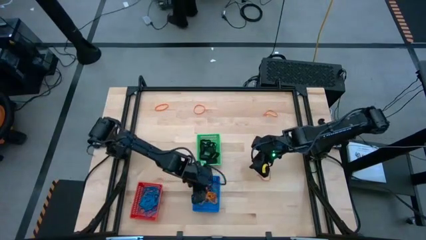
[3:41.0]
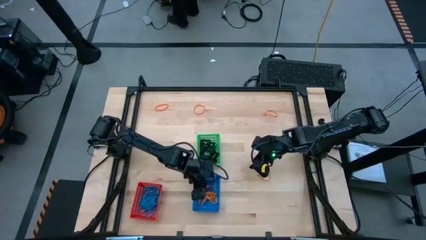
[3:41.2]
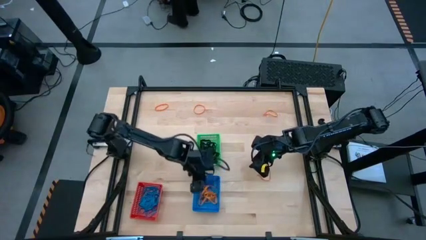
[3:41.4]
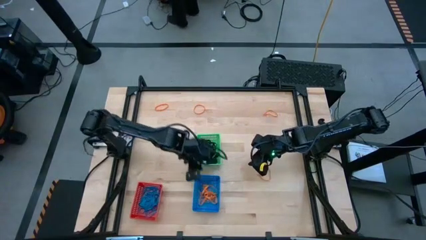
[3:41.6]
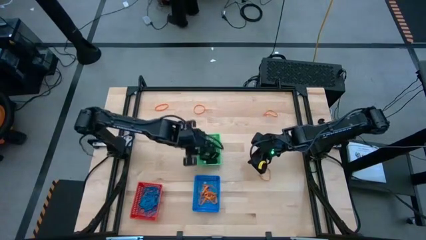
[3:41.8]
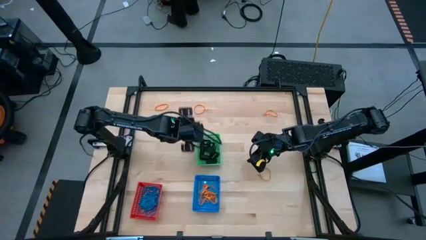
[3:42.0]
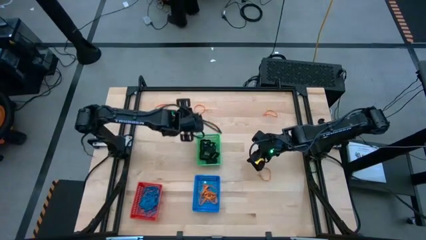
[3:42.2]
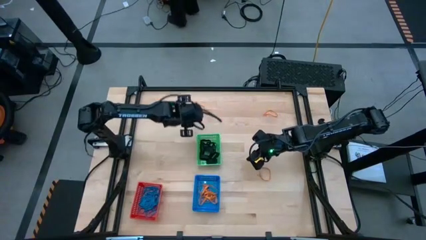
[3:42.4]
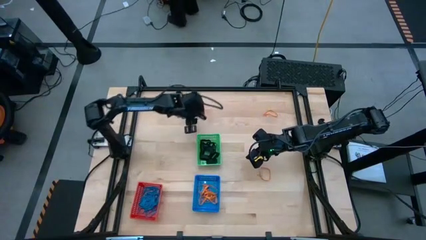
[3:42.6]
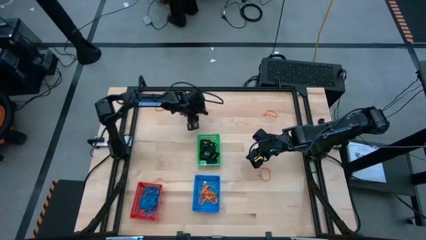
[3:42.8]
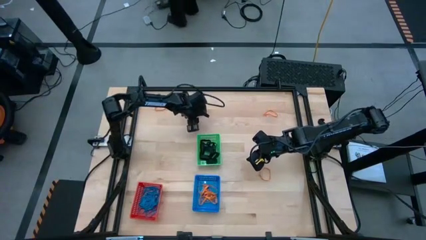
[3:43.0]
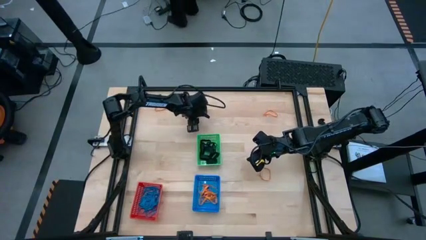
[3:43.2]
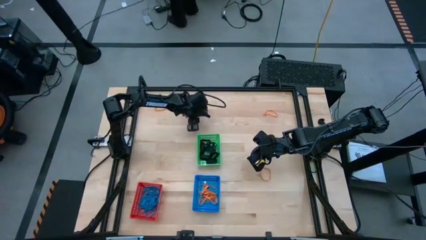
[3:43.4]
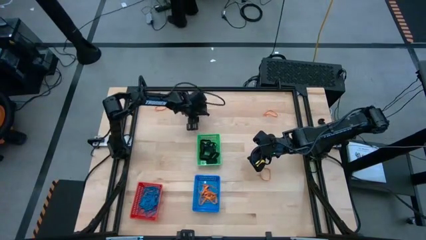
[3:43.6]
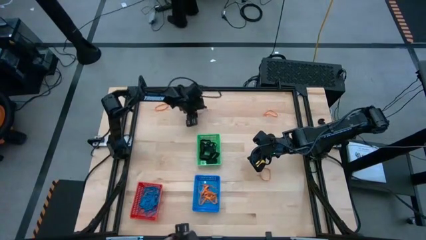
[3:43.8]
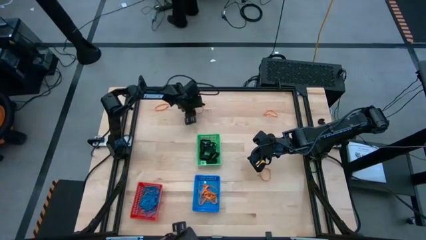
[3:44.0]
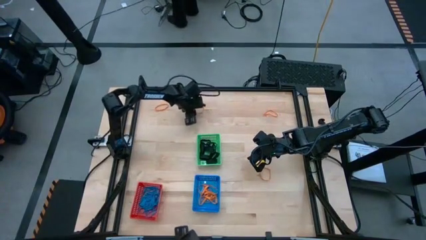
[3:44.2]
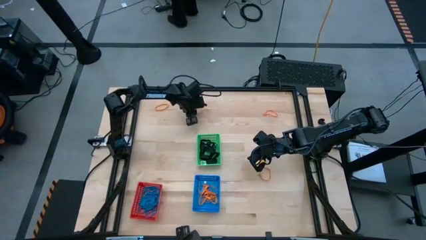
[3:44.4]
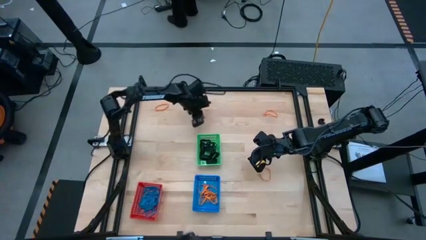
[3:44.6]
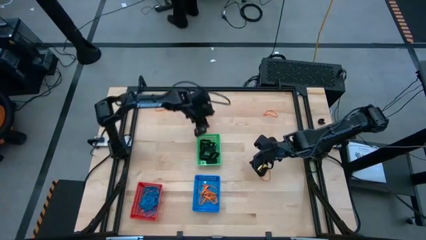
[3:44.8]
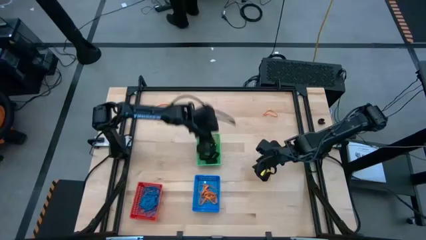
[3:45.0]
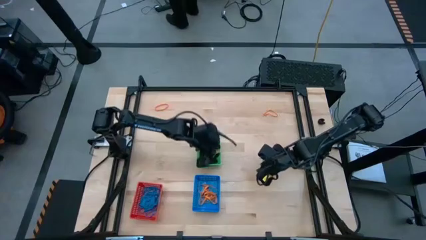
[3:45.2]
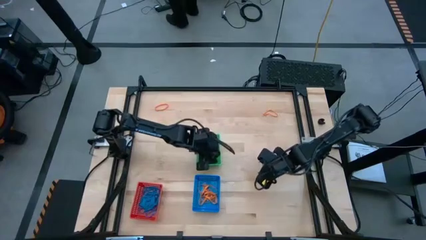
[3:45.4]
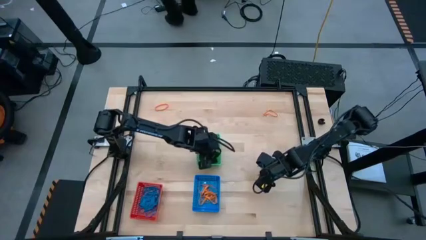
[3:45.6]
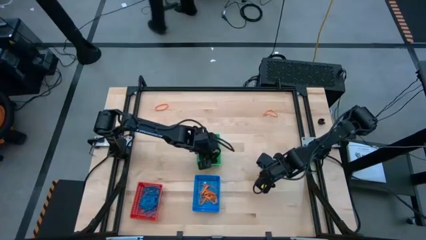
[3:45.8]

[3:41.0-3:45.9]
Task: Sort rubber bands into baskets
Put the orange rubberband into the blue bin

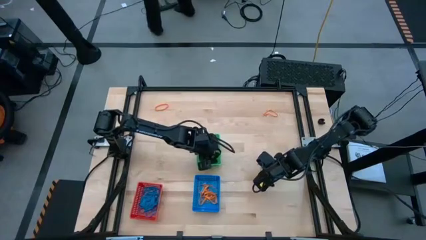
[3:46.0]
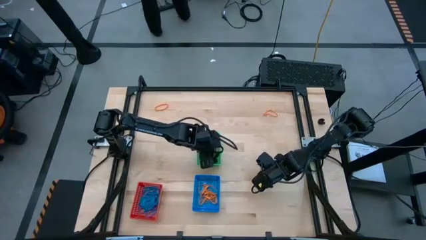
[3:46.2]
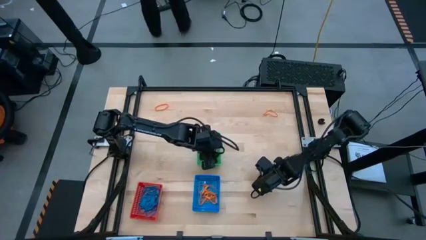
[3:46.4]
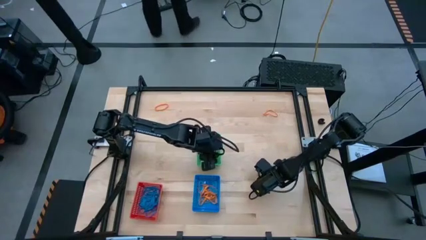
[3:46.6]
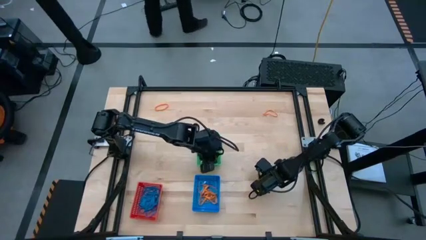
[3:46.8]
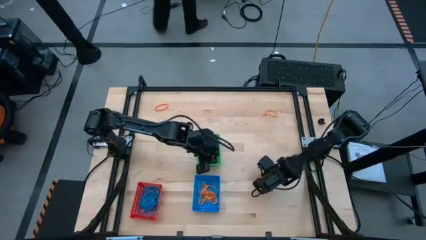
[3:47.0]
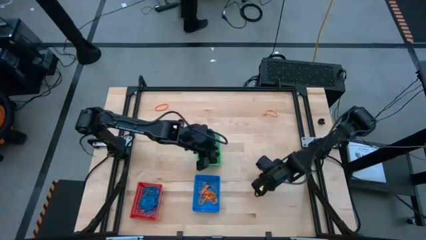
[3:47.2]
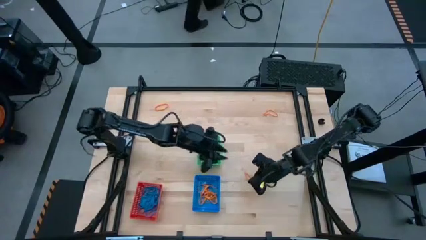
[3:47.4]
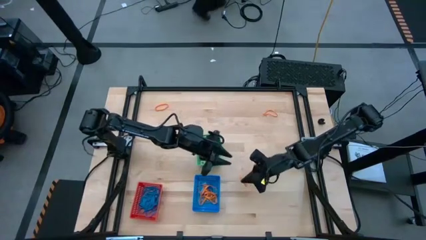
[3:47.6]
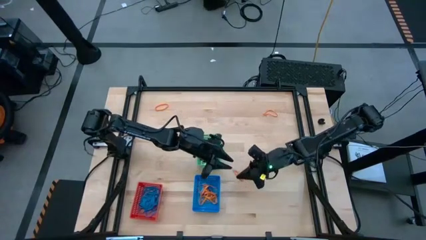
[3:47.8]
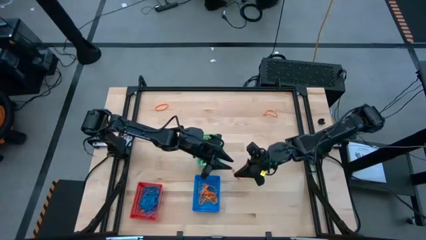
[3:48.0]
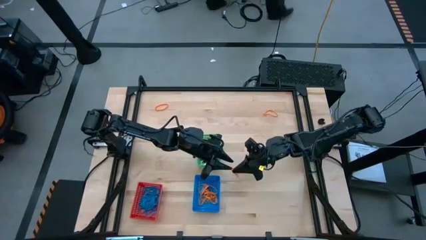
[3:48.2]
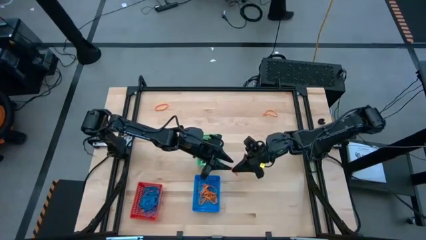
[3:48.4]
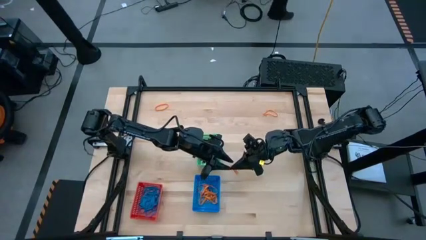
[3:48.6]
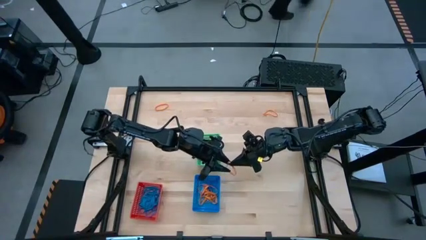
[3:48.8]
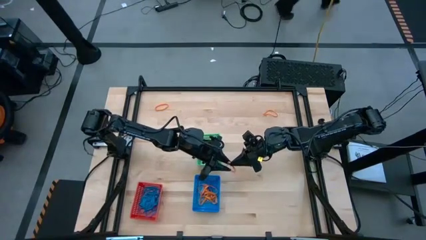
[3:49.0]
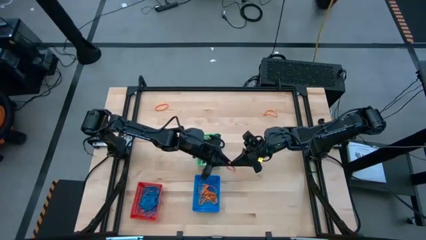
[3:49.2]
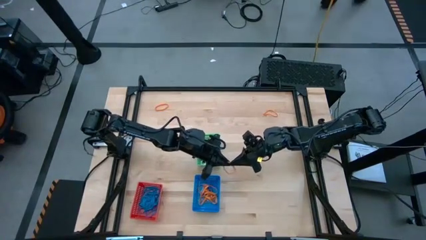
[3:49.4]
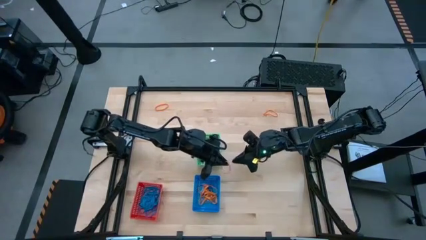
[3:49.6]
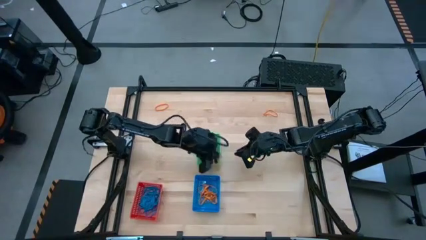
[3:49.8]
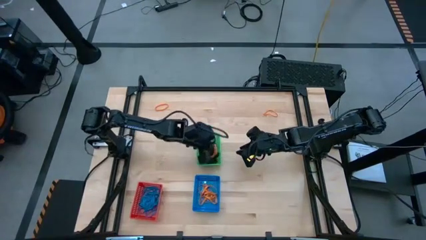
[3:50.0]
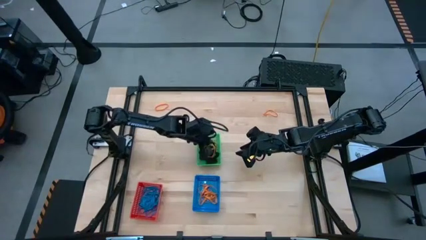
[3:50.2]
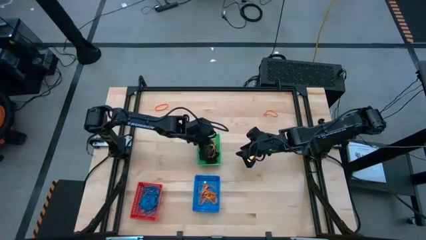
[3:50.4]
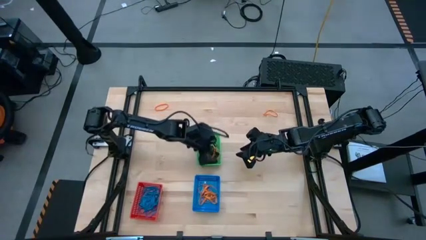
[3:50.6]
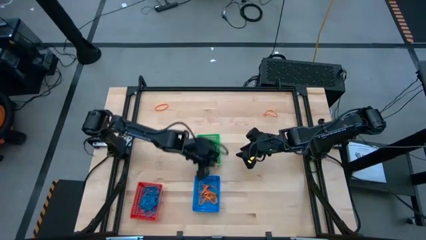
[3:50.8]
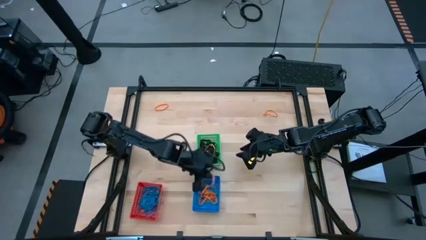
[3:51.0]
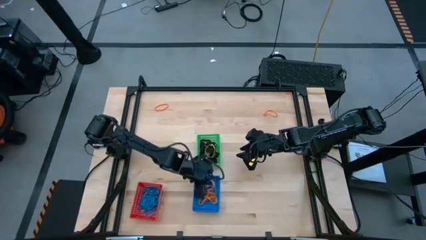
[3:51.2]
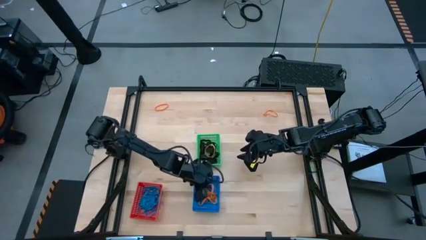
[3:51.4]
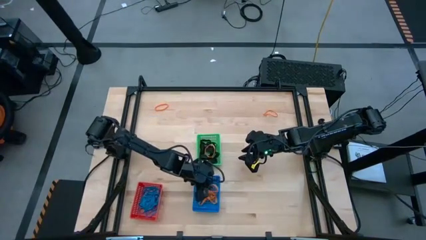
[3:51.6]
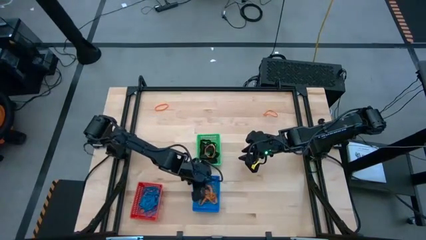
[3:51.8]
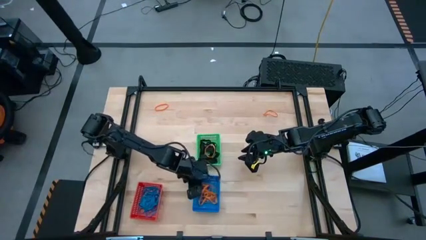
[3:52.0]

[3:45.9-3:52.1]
Put the orange rubberband into the blue bin

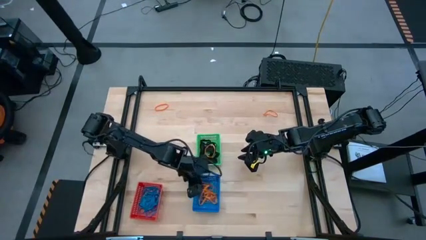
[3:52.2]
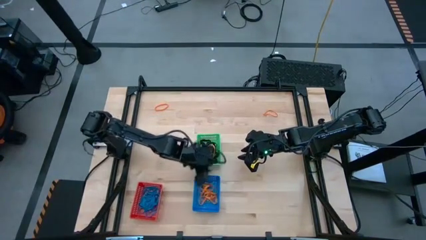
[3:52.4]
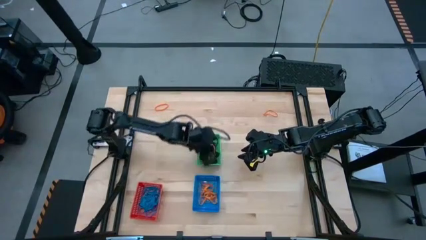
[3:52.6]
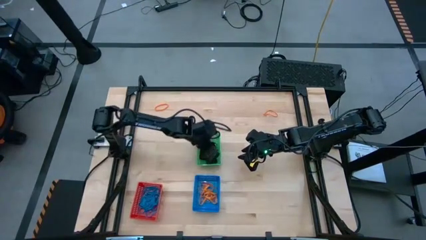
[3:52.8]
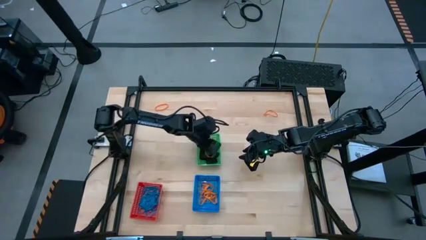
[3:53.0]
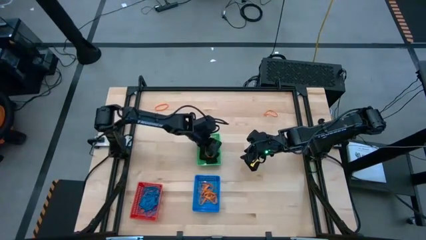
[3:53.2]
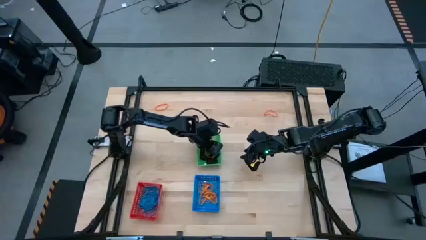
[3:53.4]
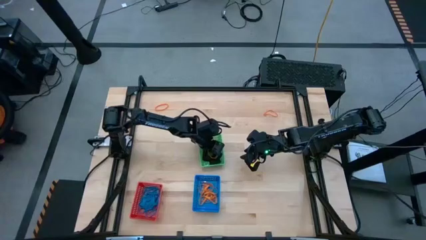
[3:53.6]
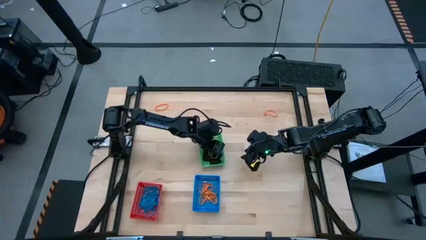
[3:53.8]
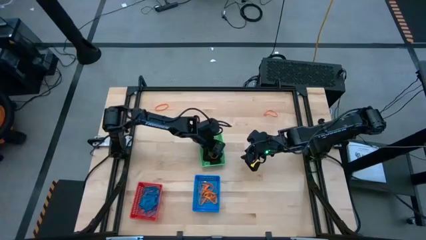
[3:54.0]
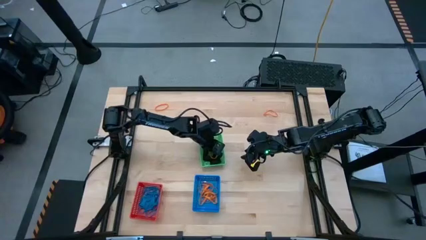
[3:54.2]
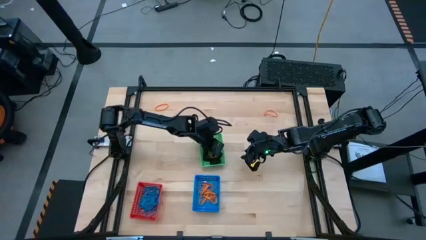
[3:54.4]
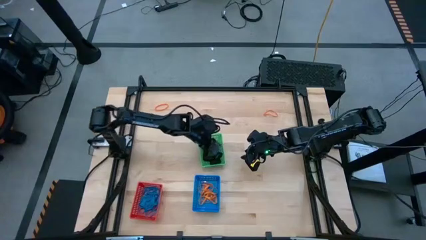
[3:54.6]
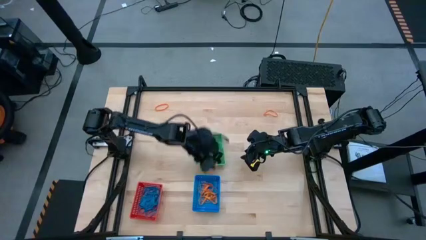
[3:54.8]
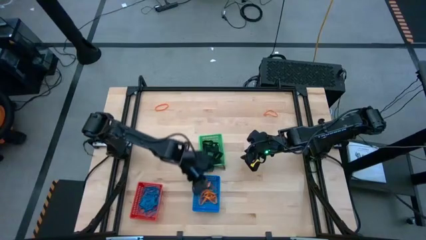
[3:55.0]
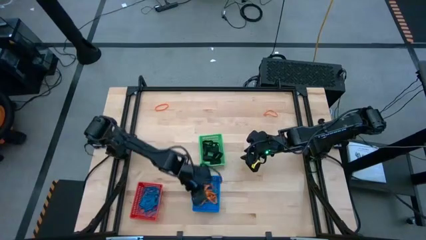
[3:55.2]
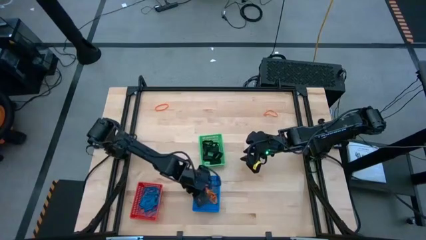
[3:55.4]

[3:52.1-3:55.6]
Put the orange rubberband into the blue bin

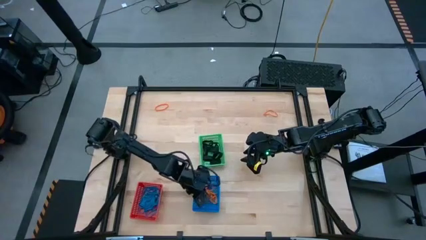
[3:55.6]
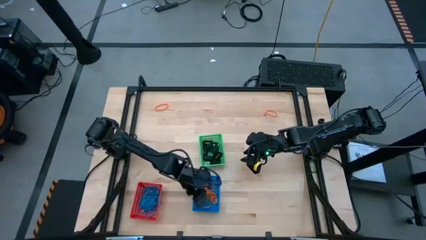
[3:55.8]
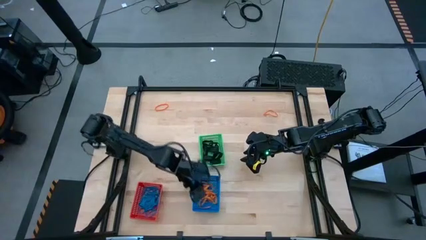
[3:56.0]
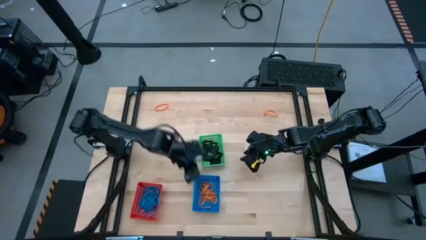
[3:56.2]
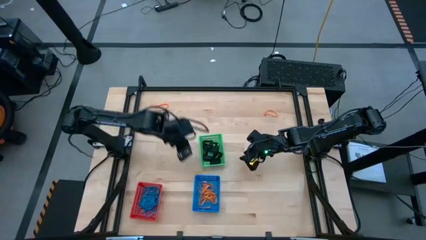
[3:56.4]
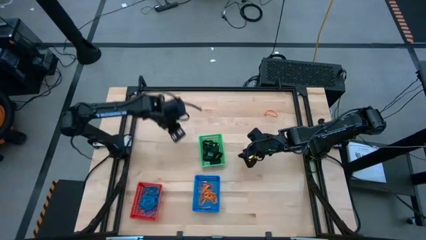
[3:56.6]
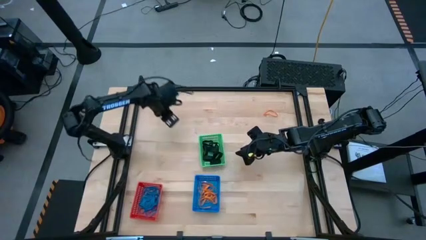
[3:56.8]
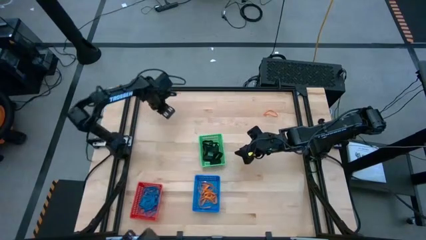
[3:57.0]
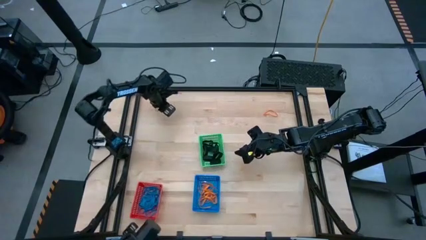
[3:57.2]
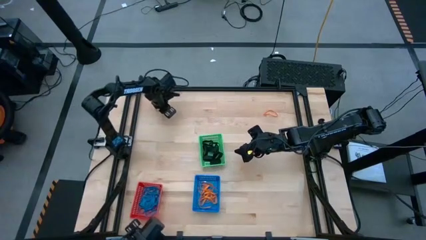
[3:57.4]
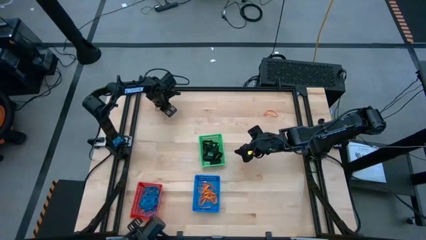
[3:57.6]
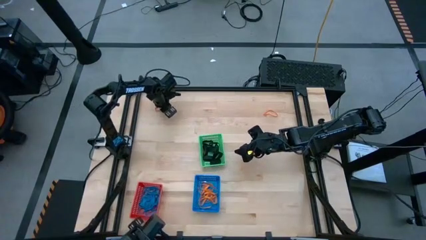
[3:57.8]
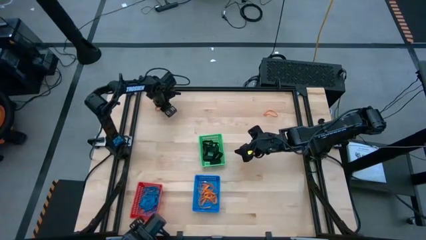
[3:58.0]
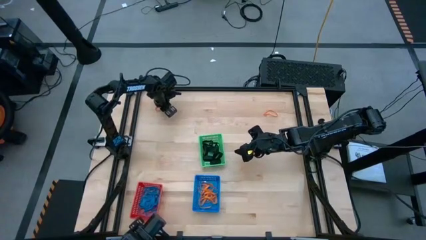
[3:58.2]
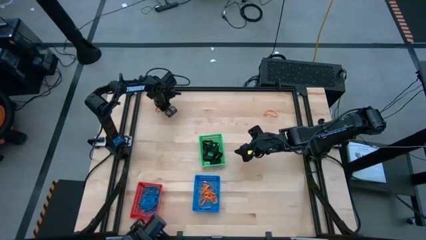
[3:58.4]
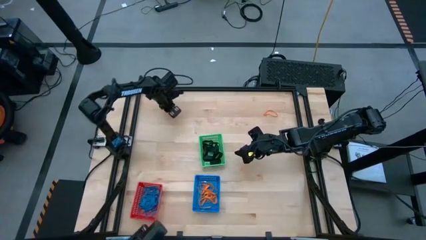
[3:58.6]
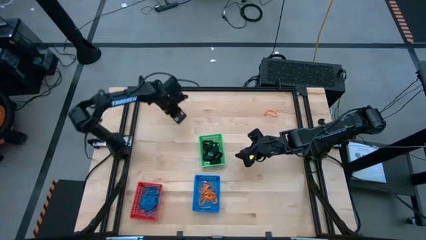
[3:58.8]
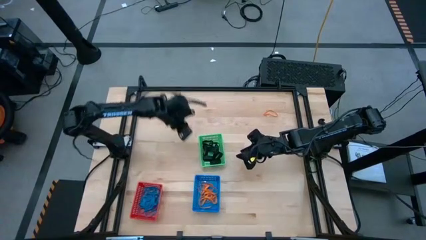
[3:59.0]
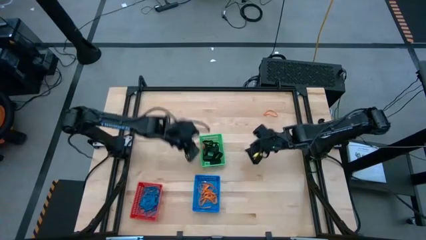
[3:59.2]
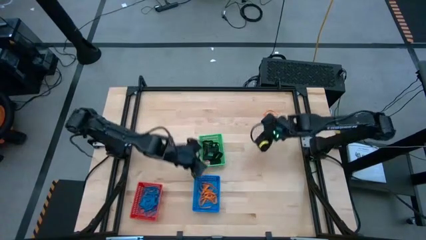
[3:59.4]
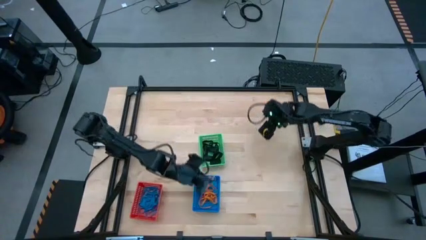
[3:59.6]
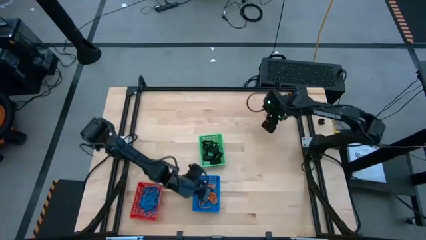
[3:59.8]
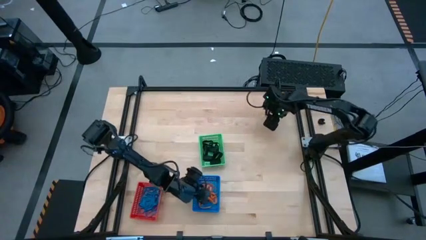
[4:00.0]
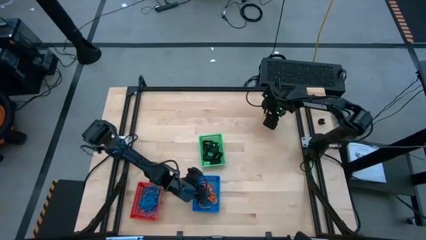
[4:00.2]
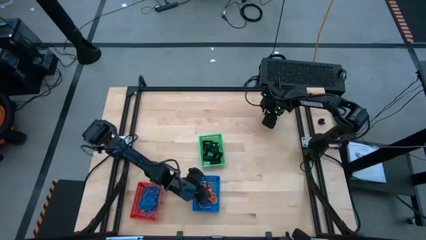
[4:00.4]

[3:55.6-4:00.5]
Put the orange rubberband into the blue bin
